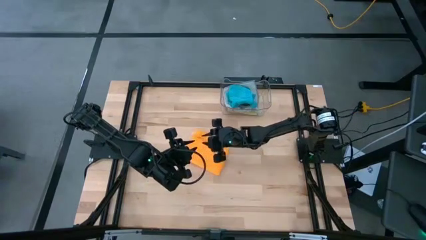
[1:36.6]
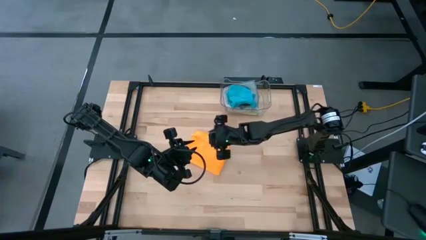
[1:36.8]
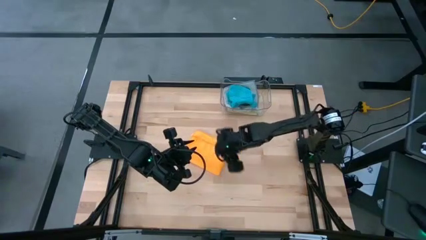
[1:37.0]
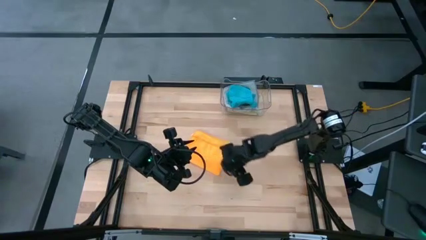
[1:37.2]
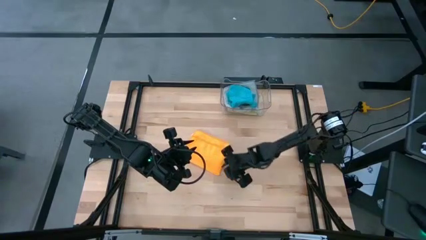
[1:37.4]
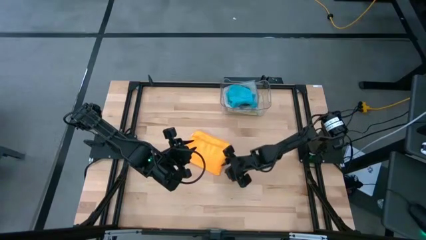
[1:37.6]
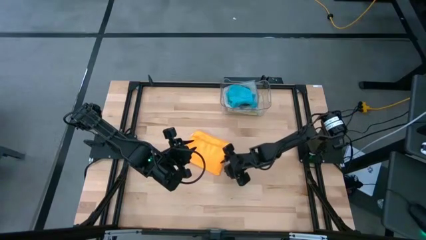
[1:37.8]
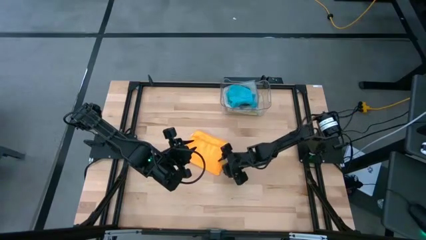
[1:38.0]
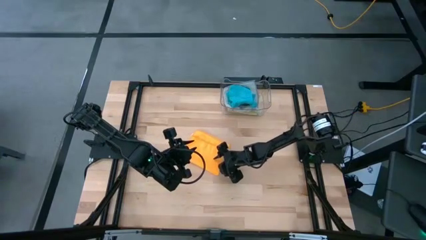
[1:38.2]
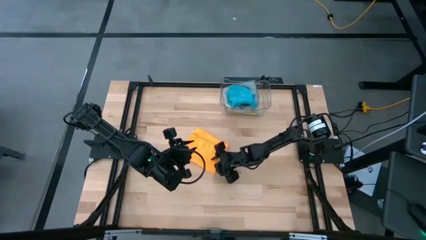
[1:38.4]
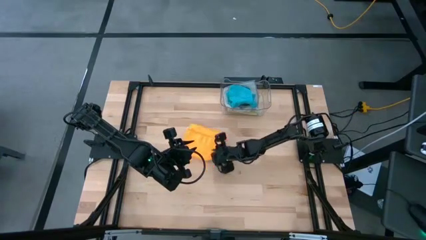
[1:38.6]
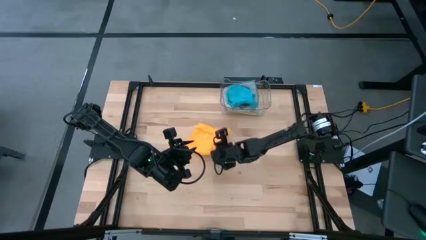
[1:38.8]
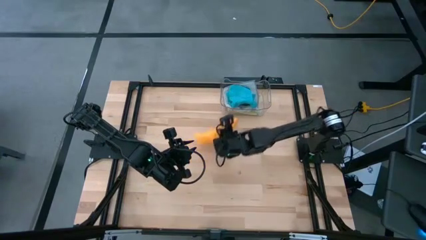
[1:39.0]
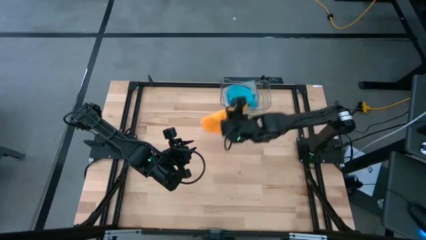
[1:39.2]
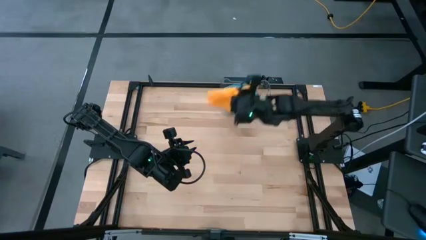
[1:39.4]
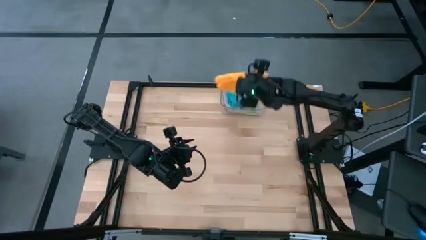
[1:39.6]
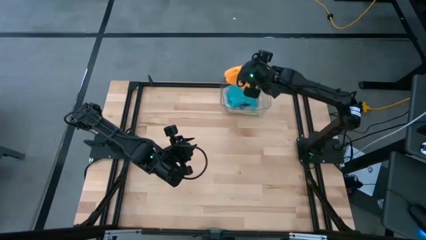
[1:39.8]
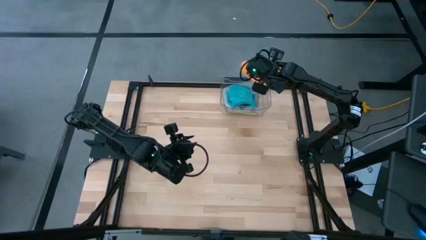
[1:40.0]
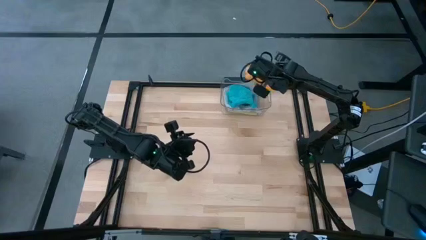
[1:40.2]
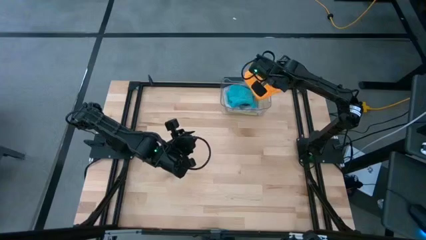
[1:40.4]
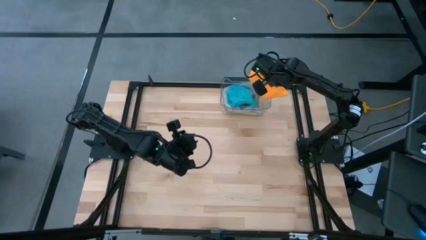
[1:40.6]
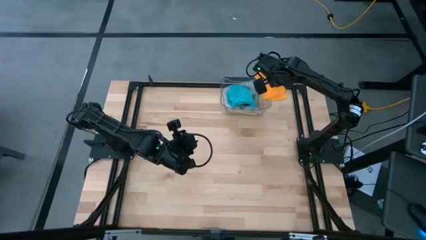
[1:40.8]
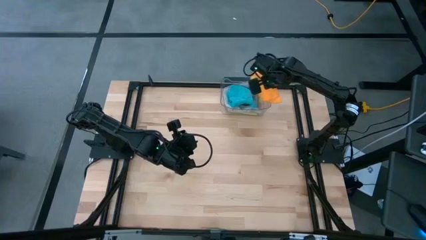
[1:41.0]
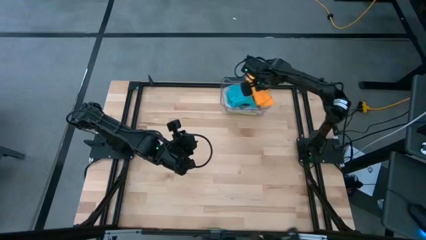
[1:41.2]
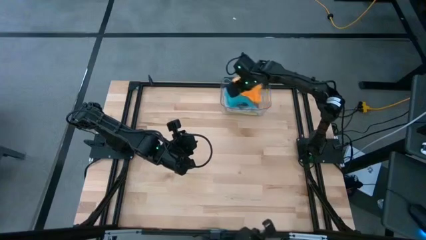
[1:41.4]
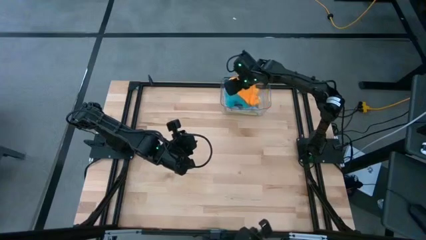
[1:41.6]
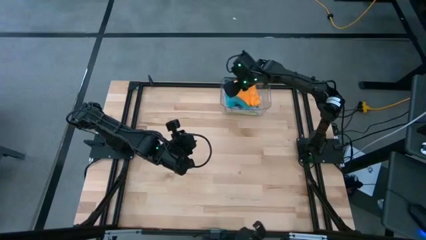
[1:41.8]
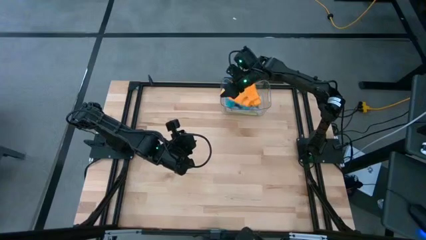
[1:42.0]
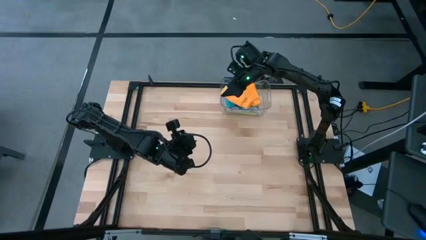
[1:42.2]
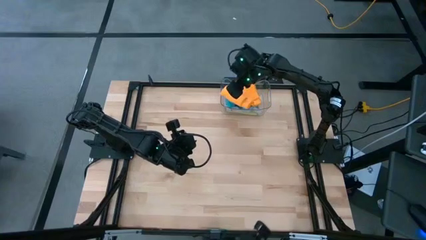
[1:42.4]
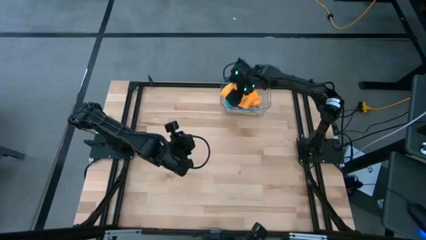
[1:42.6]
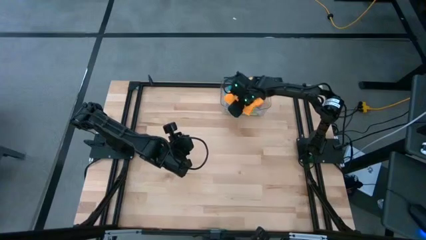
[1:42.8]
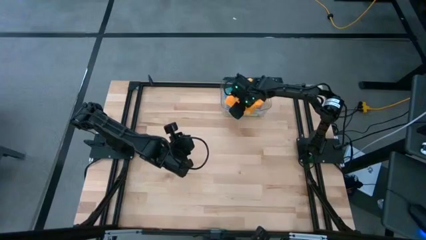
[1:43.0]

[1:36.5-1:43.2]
Task: Fold microfiber towels
Put the yellow microfiber towel into the transparent bin

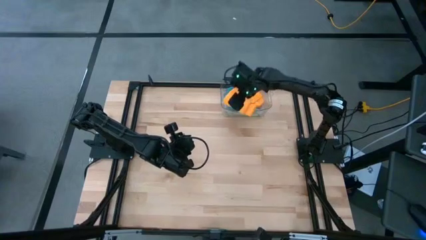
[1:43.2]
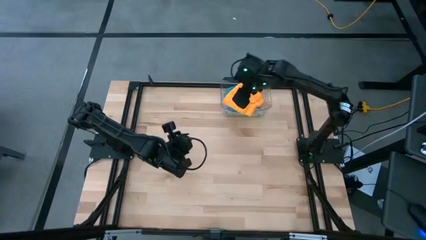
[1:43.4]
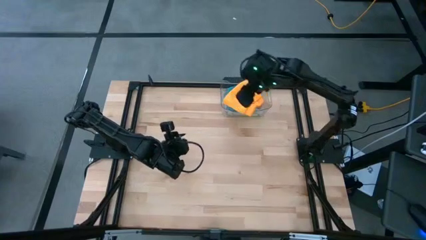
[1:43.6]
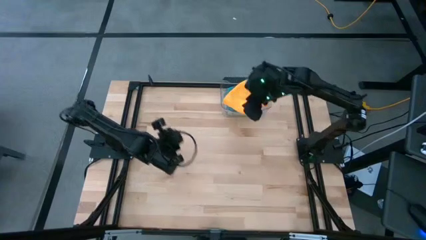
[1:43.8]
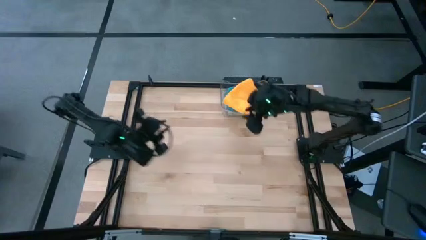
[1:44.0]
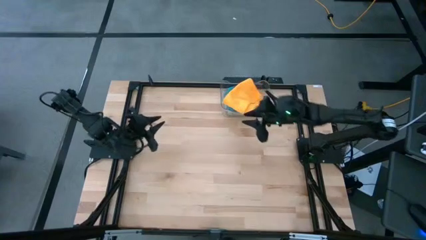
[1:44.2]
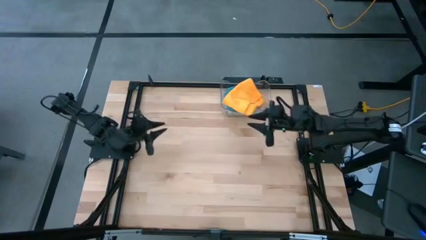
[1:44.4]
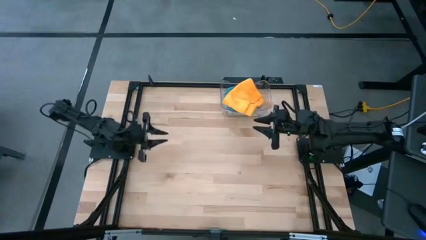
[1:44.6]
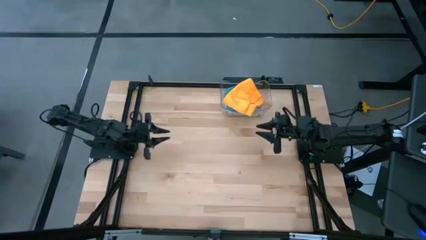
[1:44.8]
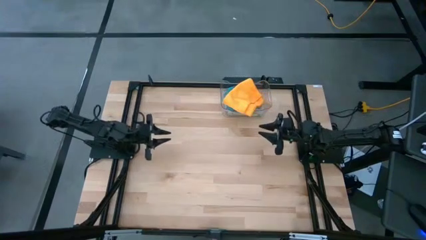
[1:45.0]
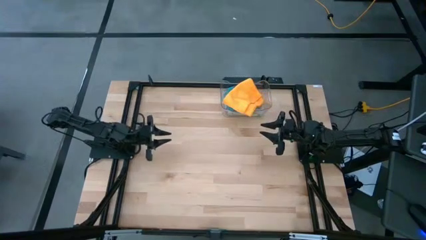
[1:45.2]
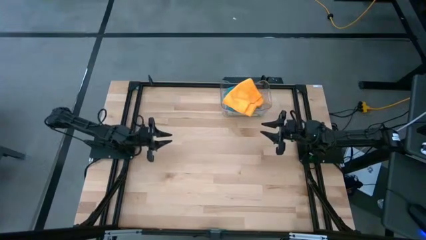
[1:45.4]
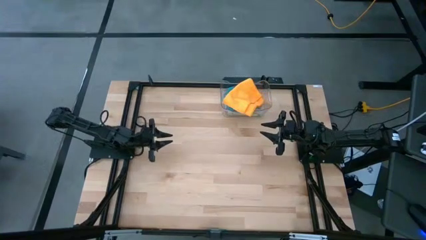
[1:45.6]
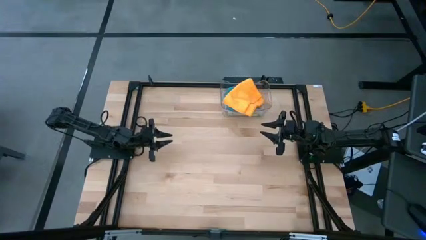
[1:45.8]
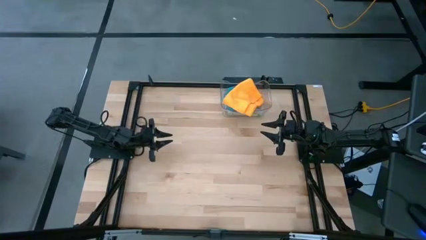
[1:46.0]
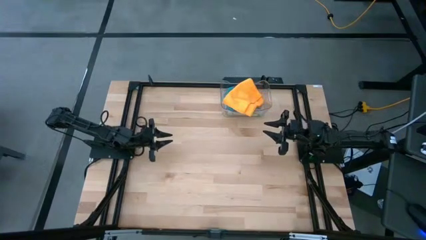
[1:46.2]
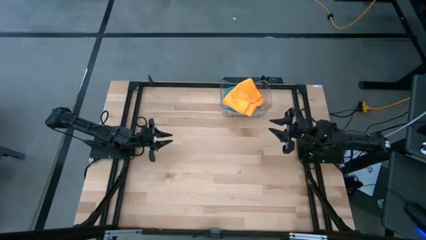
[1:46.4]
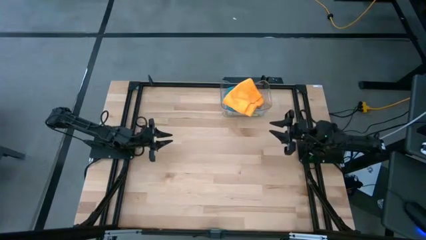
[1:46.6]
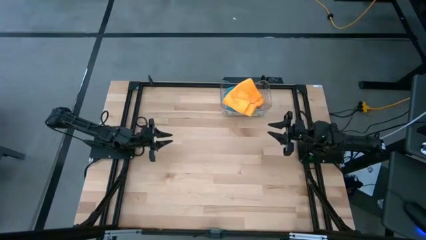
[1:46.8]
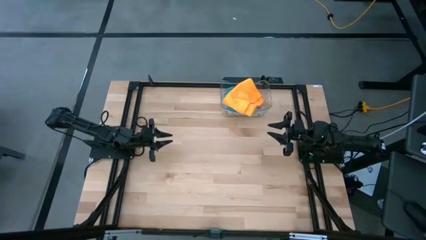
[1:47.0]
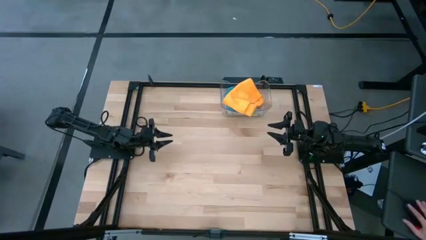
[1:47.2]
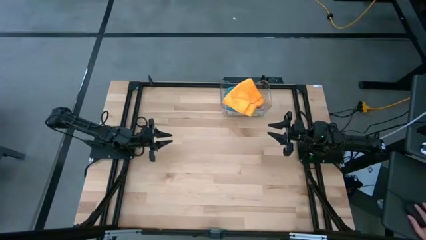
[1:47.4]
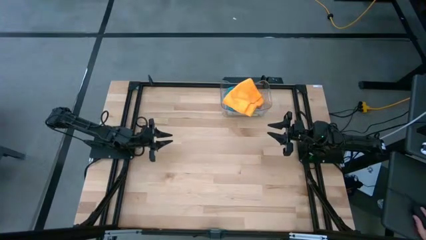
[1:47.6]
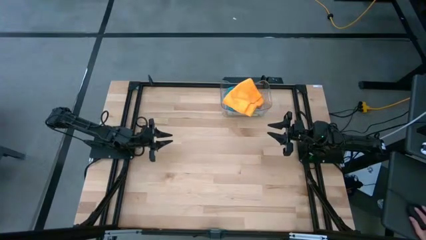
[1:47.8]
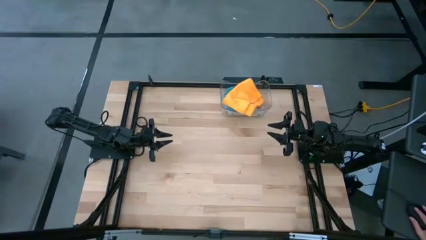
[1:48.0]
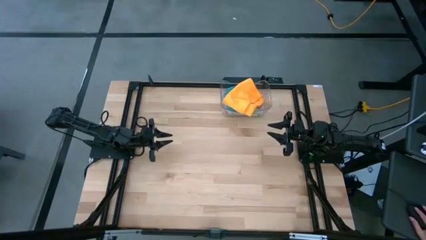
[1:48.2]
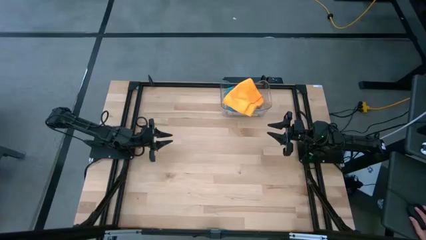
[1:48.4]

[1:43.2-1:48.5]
Return to Home Position
